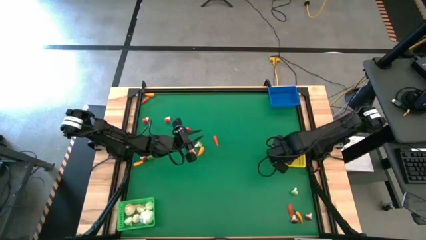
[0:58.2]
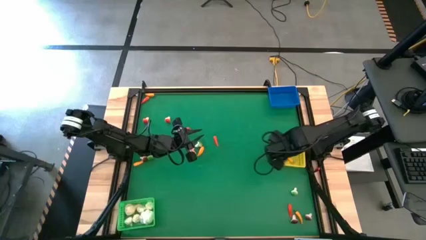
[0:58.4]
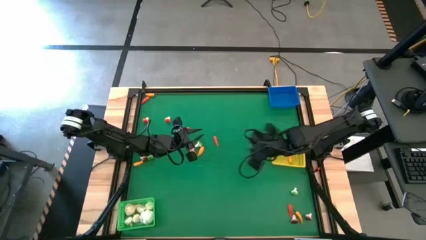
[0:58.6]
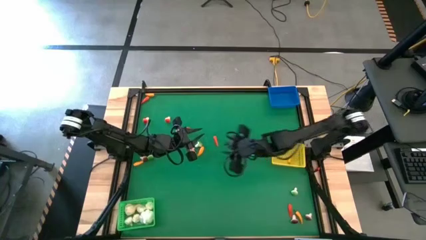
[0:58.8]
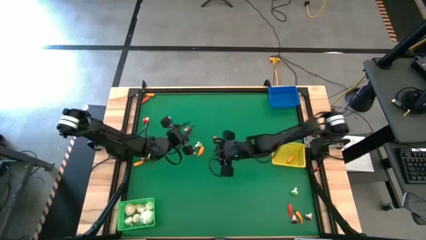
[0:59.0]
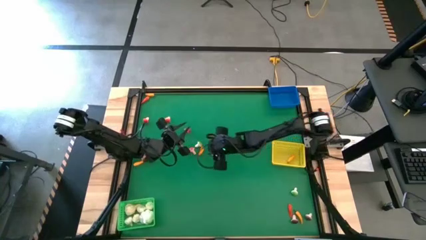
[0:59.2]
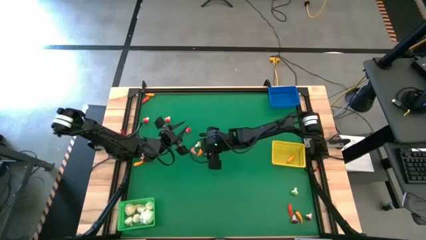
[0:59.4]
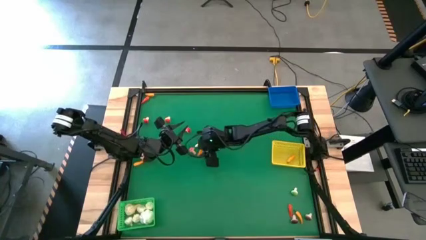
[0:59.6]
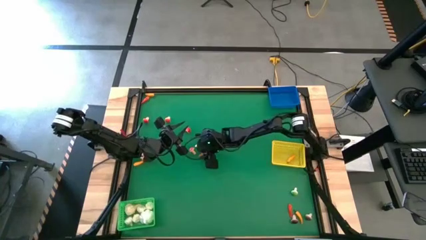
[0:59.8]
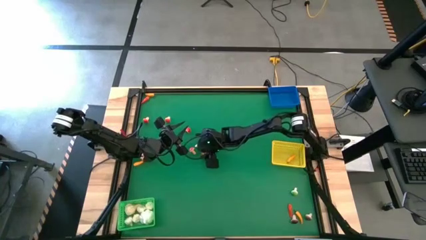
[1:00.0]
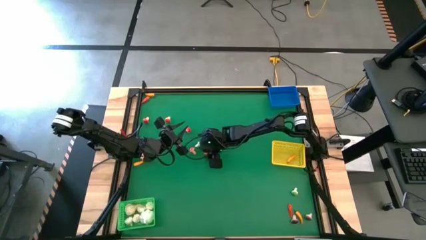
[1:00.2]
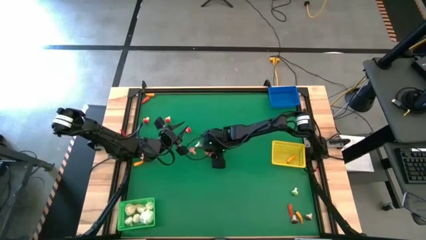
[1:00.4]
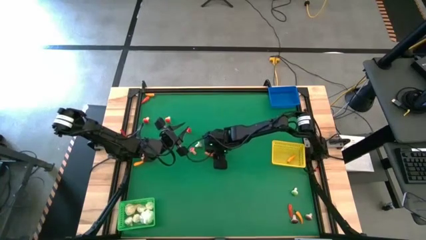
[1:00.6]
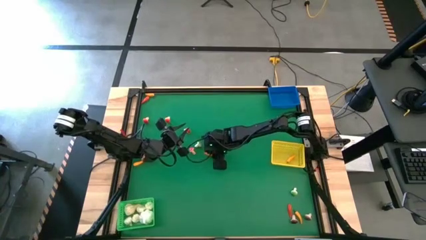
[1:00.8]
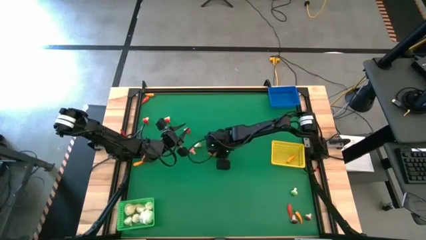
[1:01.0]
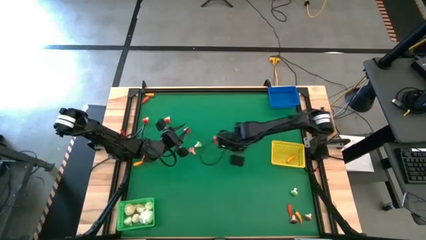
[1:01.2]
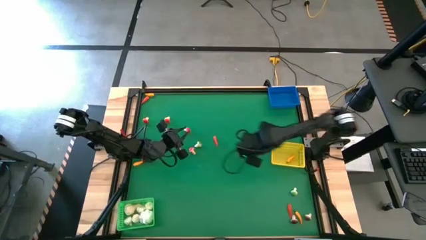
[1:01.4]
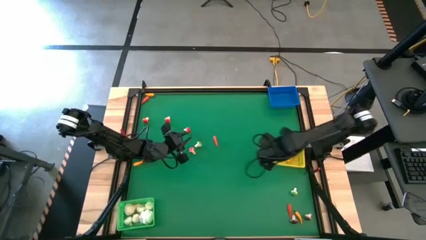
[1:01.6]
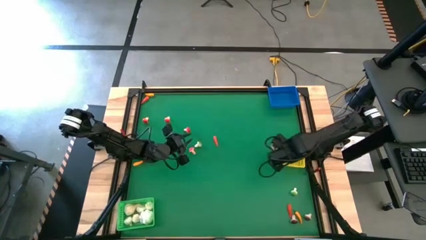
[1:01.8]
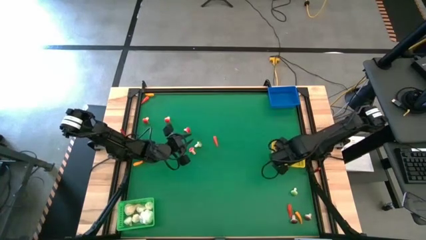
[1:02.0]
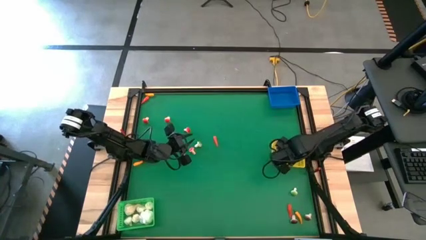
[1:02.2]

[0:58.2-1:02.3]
Task: Sort produce into baskets
Put the yellow chili into the yellow bin

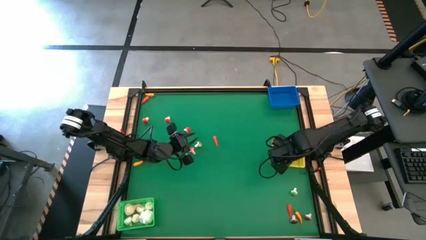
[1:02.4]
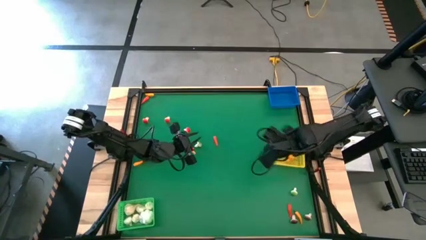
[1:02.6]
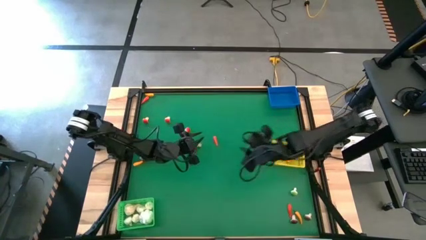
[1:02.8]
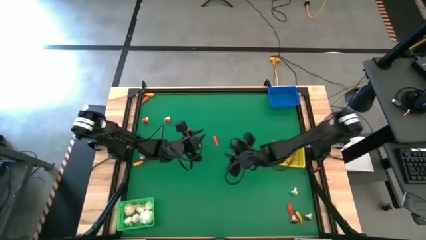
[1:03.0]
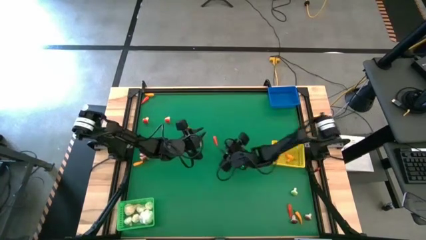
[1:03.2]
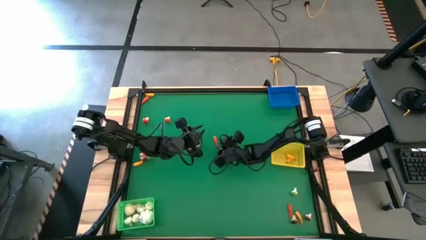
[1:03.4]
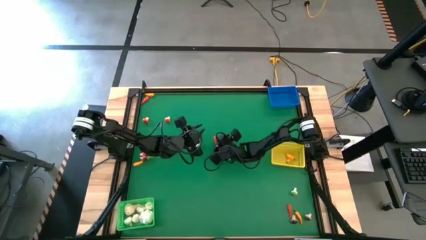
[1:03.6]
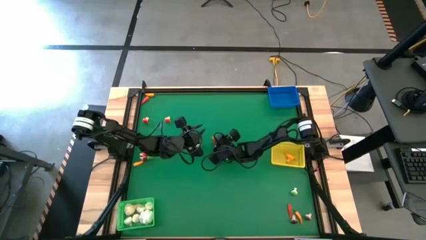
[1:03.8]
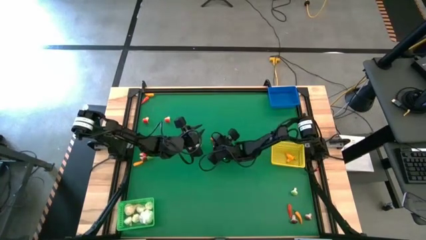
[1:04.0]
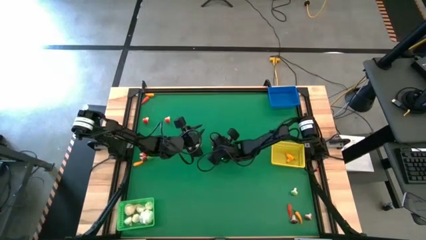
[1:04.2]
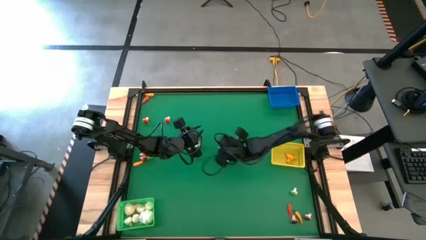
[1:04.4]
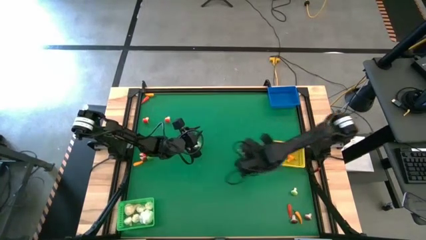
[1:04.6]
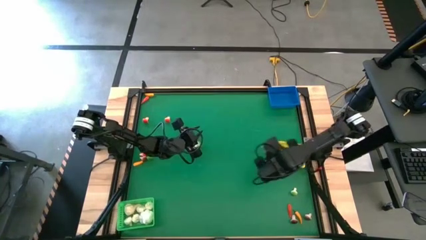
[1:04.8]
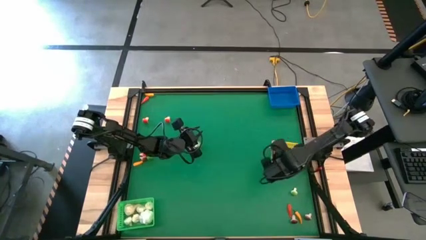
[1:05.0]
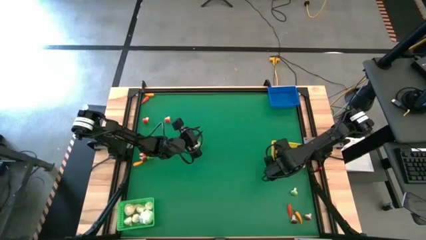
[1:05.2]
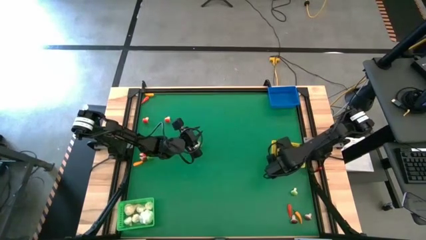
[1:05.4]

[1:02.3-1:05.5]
Put the red chili into the yellow bin

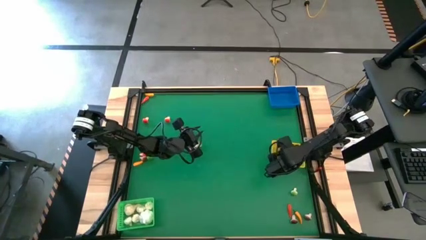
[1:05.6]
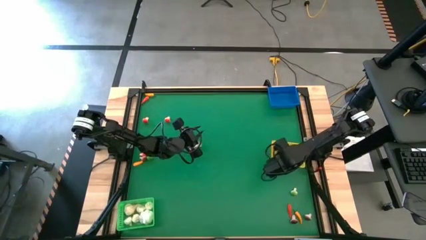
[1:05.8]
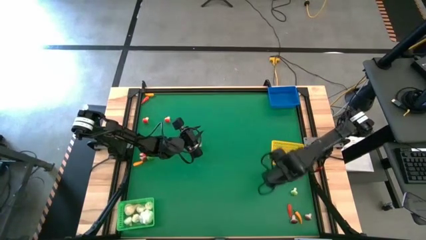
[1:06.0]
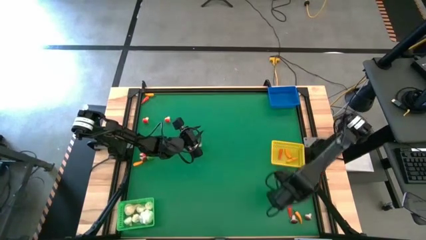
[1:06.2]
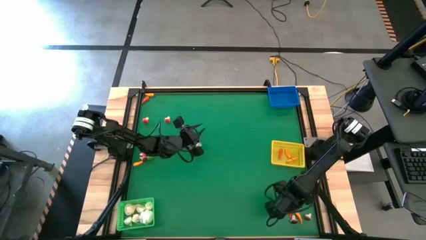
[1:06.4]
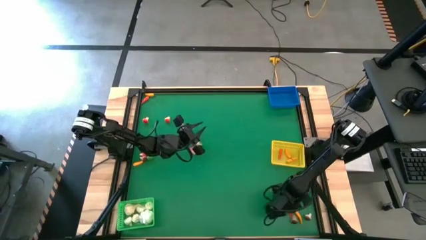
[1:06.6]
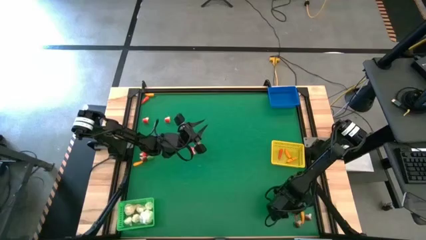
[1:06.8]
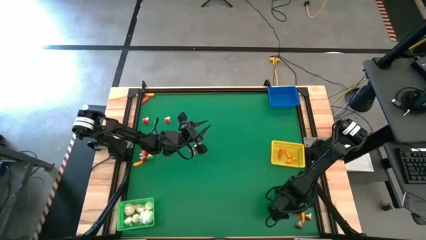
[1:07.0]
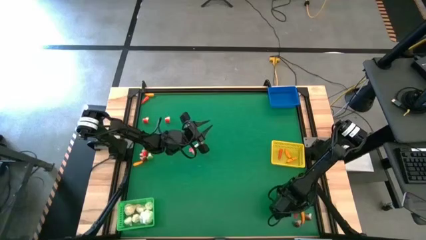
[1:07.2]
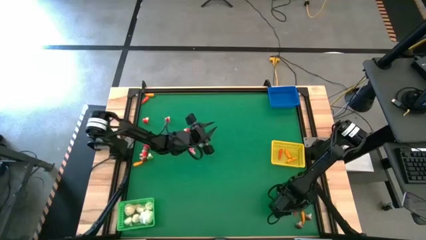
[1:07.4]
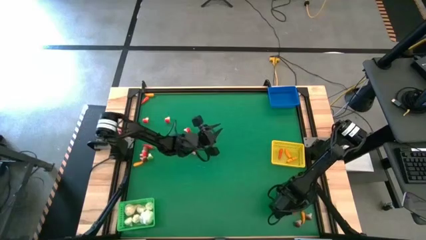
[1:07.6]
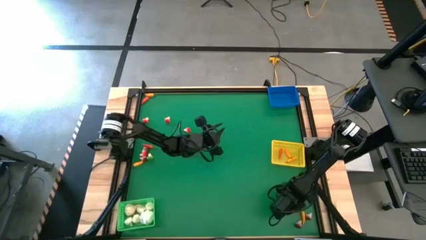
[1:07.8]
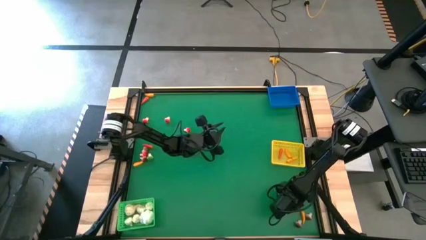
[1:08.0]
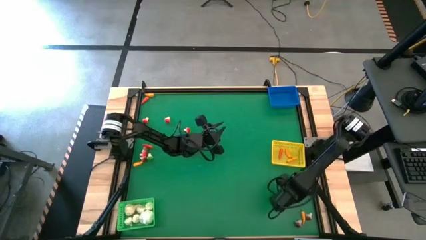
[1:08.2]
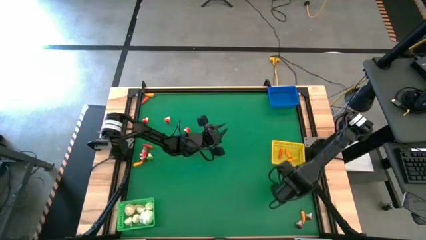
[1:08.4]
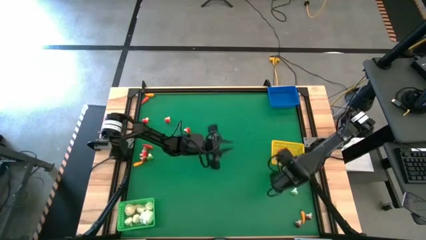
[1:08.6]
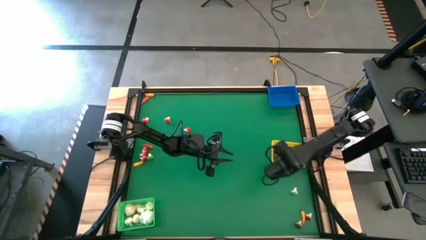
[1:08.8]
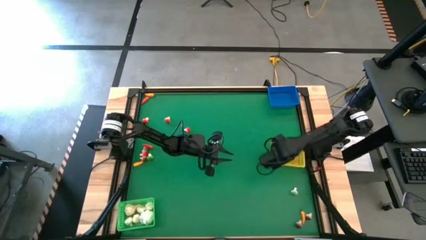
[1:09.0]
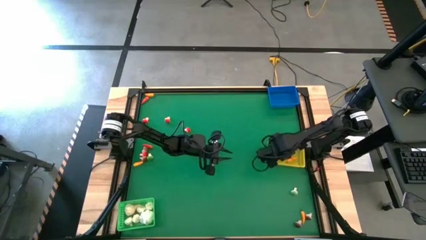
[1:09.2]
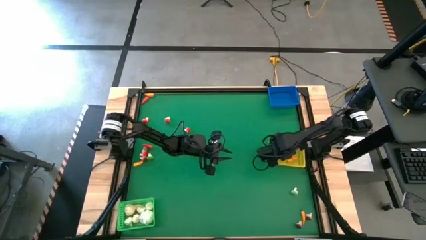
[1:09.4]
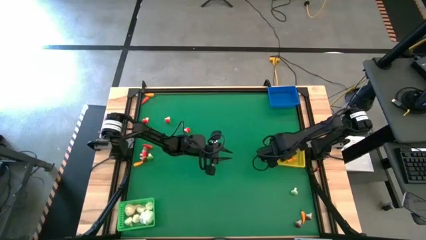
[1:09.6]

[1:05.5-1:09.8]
Put the red chili into the yellow bin

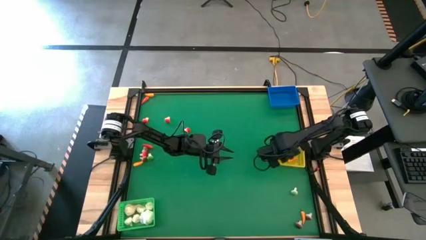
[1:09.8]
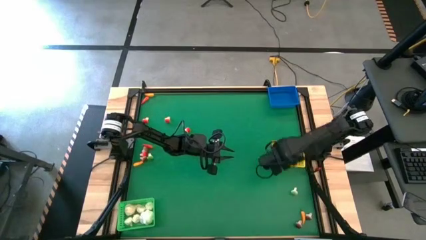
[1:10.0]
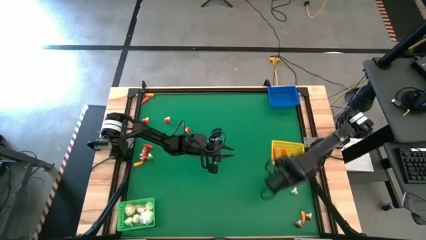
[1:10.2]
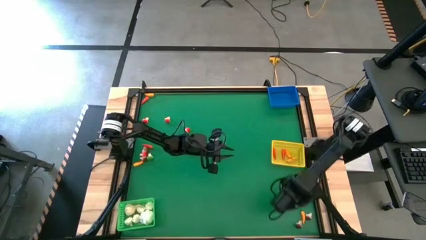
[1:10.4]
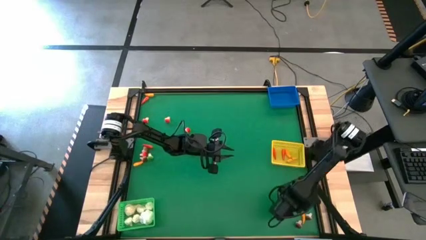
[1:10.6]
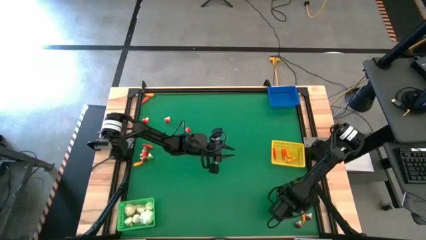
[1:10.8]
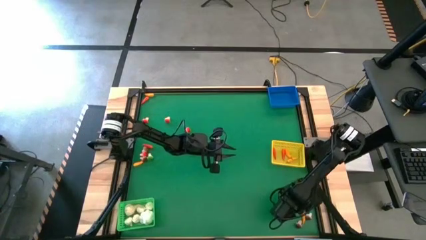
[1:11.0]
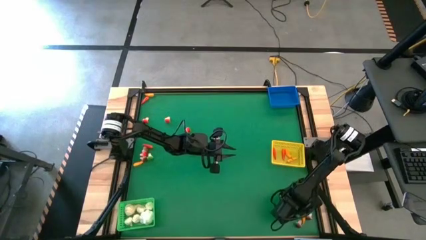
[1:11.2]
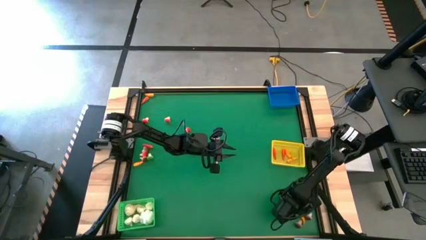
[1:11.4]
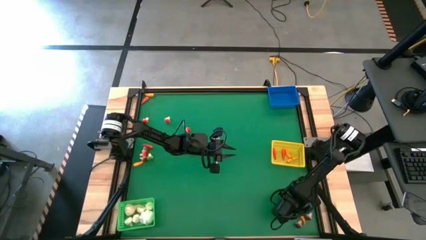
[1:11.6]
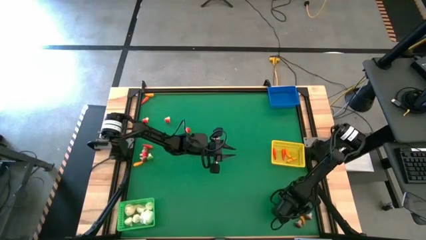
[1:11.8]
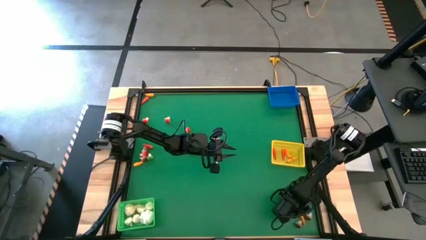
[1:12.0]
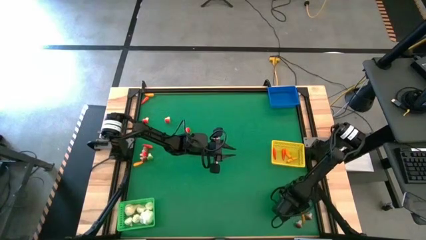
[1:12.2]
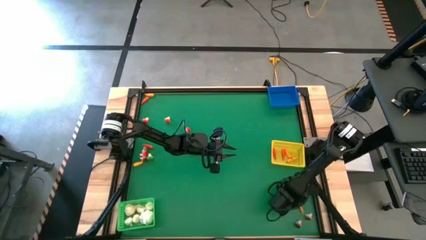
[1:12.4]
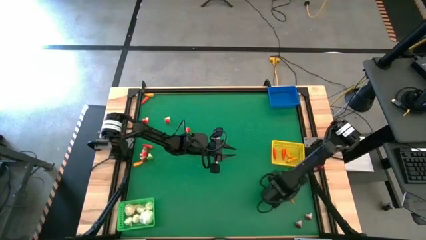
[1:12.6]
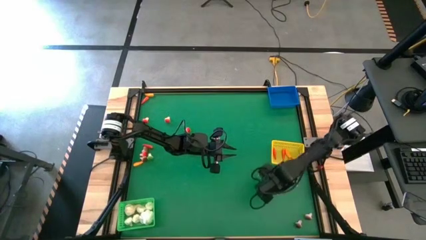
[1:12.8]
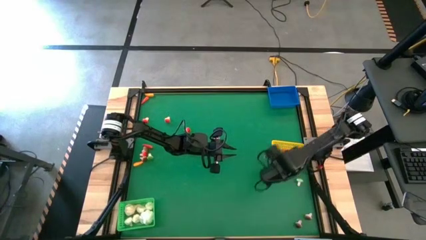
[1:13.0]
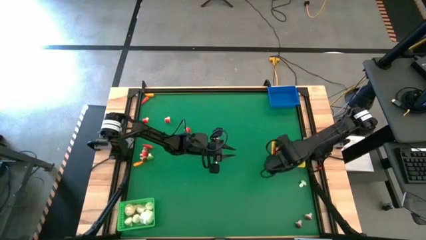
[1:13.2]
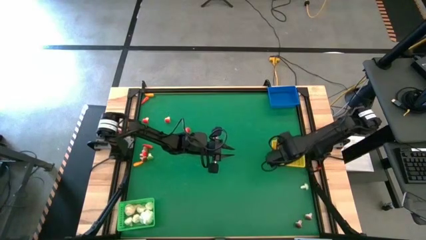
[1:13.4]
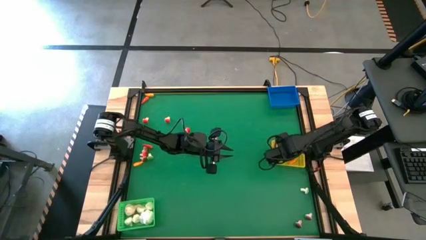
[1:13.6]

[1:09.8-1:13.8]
Put the yellow chili into the yellow bin
